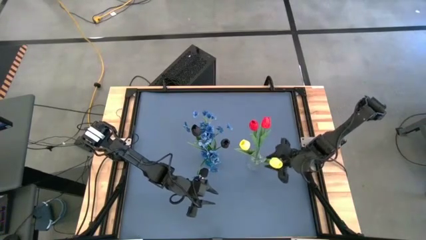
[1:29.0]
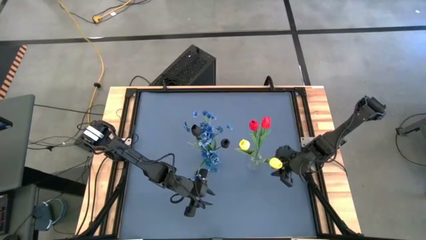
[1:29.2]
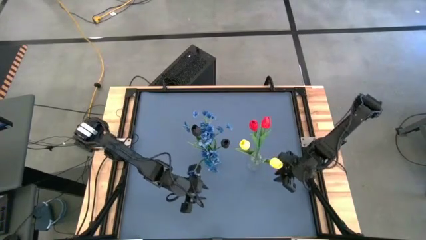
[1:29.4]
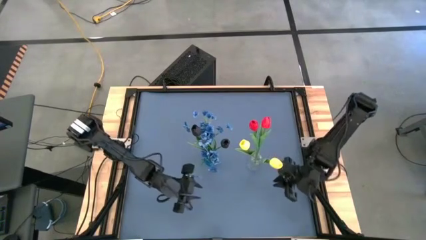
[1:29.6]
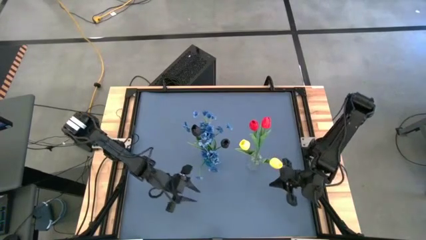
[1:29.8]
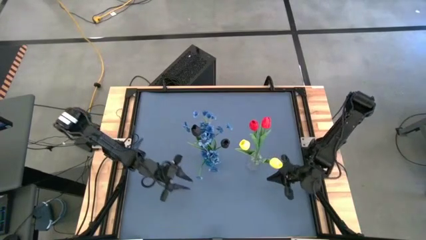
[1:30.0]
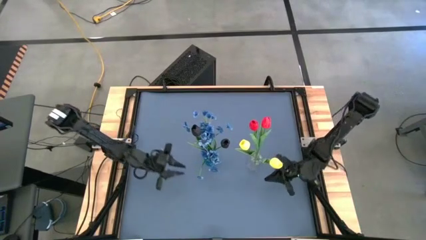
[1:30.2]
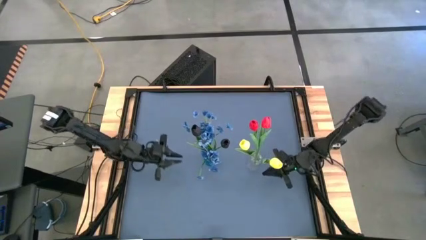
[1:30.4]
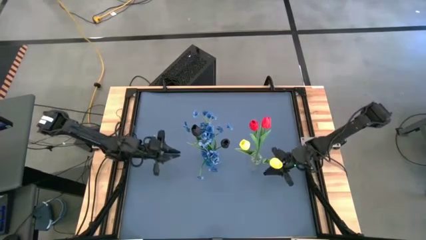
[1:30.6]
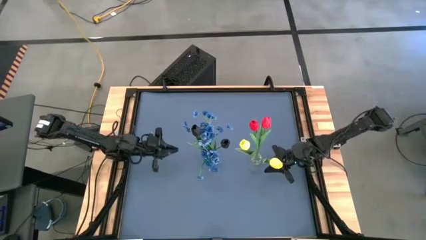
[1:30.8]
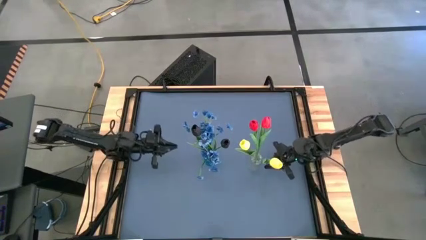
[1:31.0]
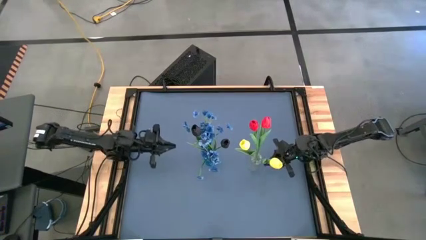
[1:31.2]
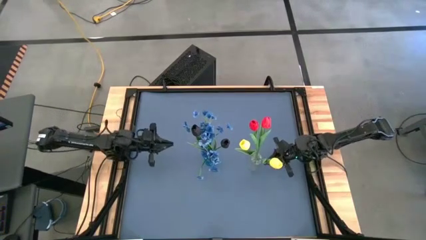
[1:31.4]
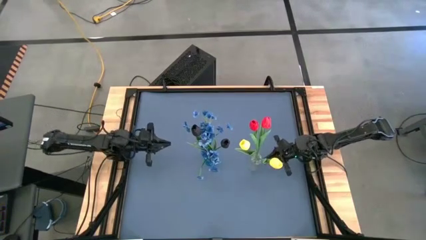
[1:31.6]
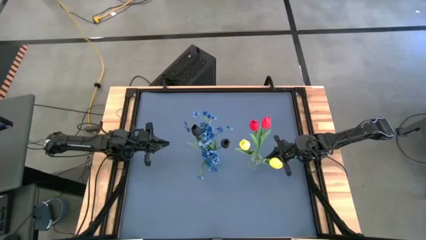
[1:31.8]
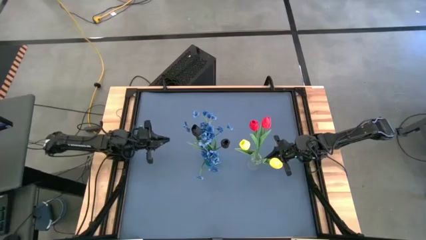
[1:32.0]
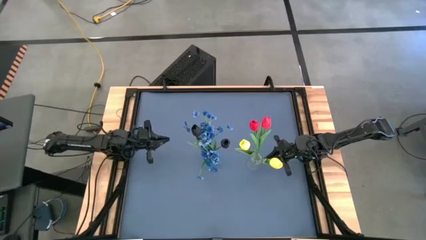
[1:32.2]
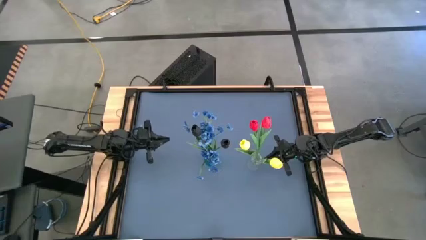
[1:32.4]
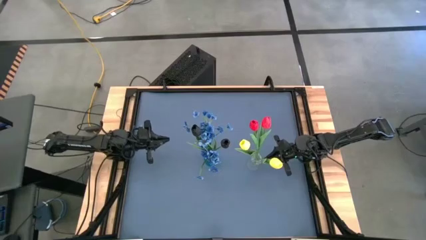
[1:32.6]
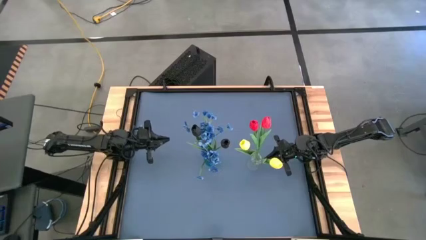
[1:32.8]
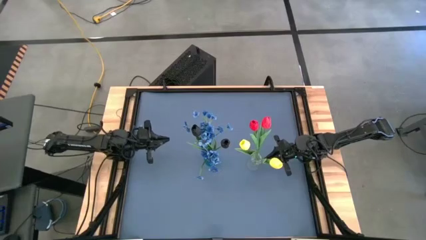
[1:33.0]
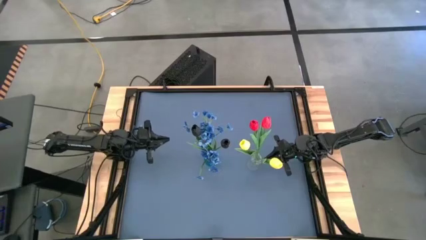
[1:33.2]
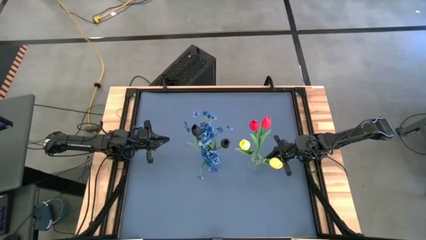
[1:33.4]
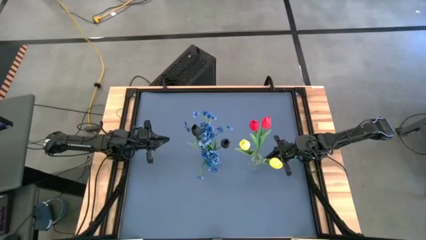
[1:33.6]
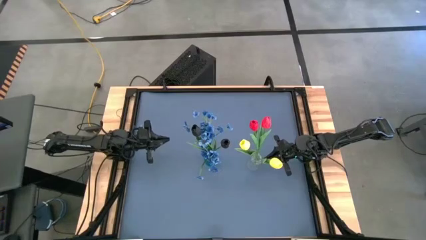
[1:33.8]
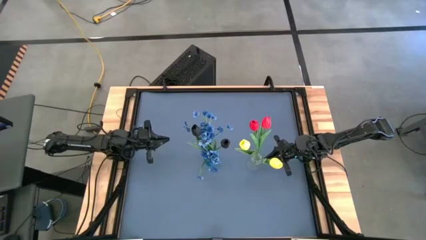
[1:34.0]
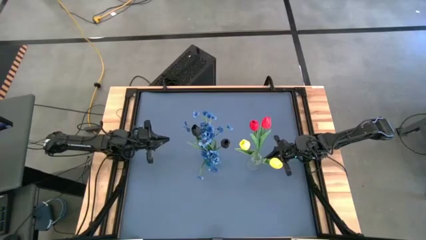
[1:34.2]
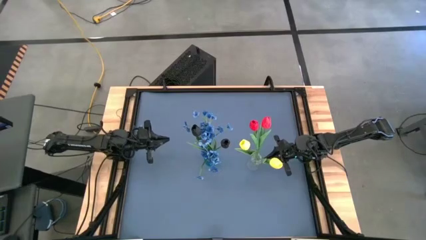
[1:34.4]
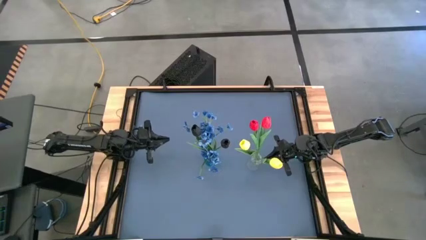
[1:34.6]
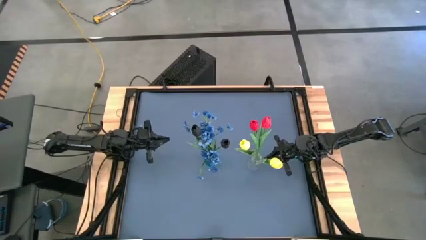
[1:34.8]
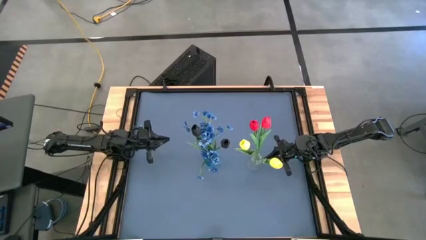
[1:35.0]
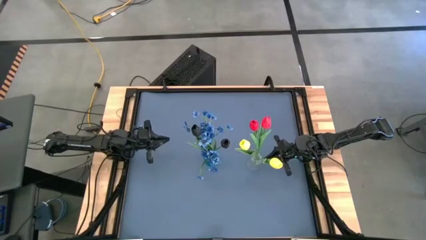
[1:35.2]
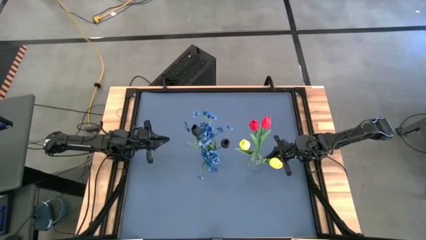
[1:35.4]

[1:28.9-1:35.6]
Task: Sort flowers into vase by color
Return to Home Position

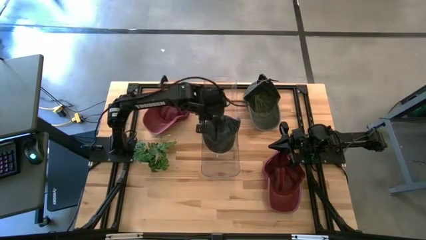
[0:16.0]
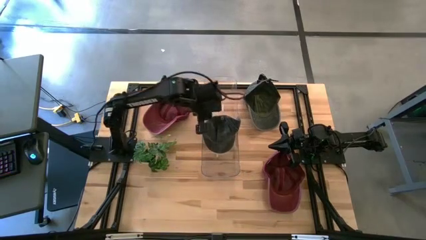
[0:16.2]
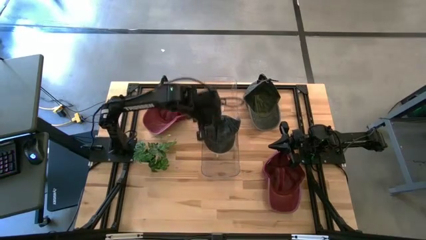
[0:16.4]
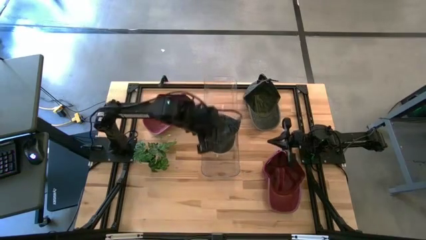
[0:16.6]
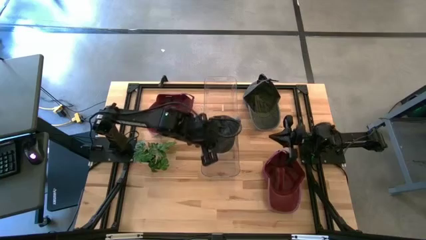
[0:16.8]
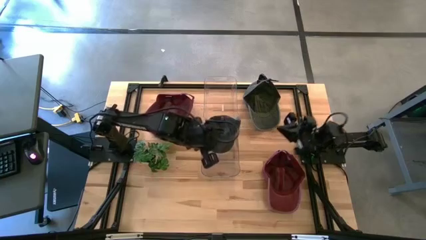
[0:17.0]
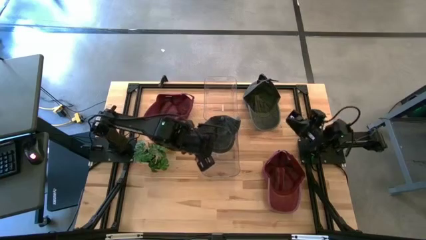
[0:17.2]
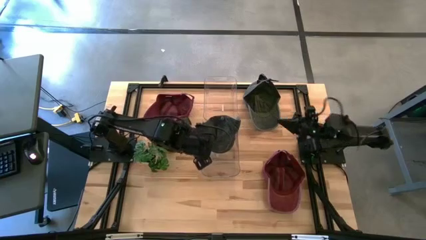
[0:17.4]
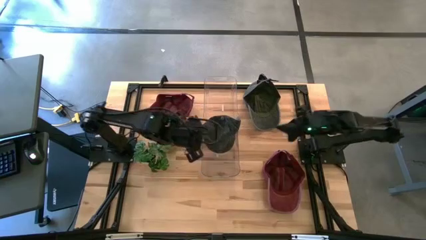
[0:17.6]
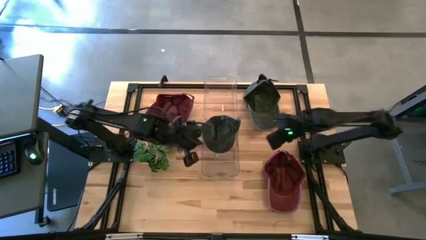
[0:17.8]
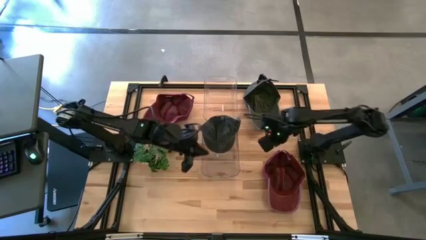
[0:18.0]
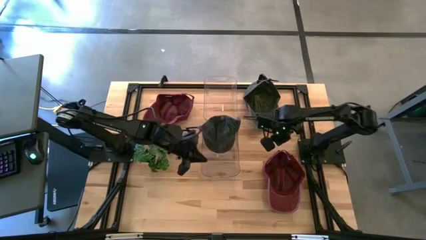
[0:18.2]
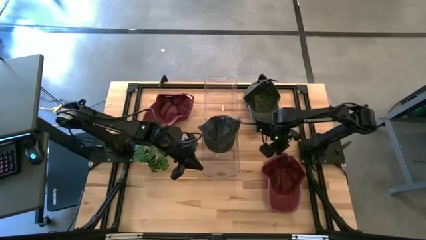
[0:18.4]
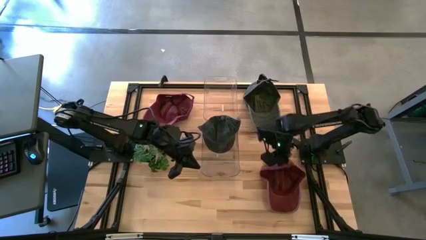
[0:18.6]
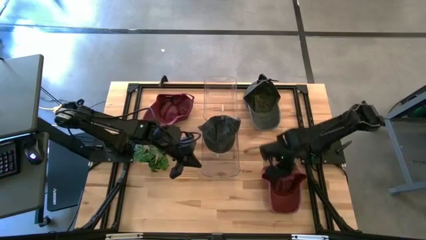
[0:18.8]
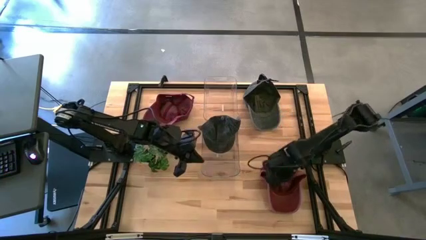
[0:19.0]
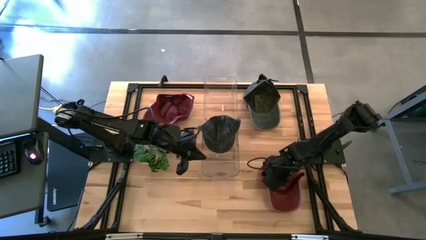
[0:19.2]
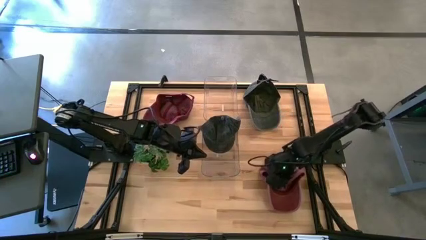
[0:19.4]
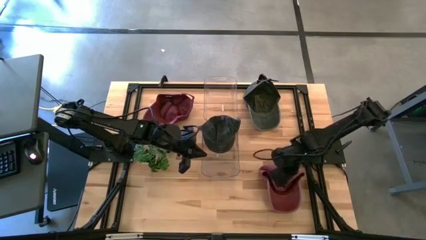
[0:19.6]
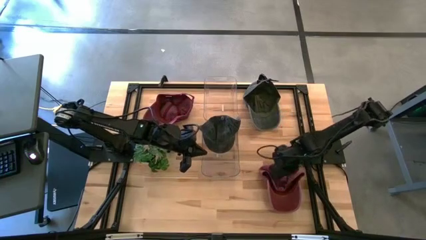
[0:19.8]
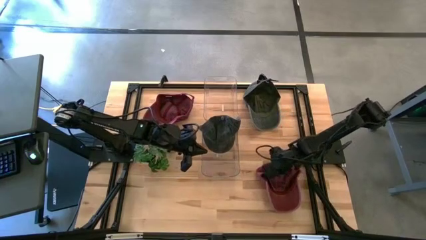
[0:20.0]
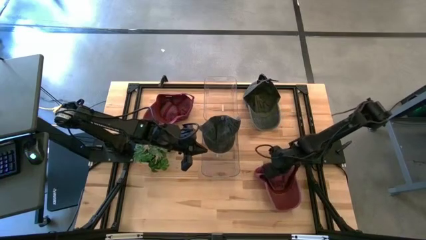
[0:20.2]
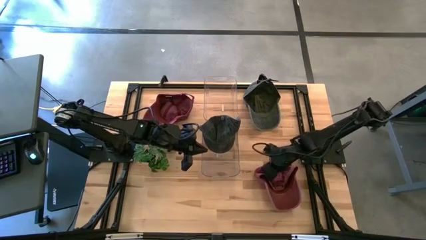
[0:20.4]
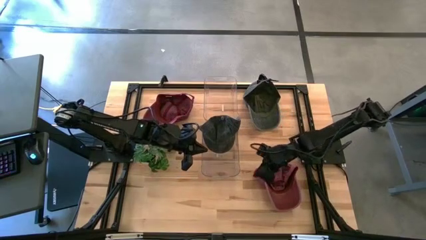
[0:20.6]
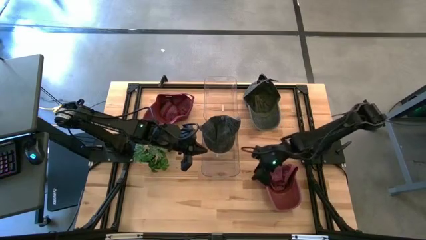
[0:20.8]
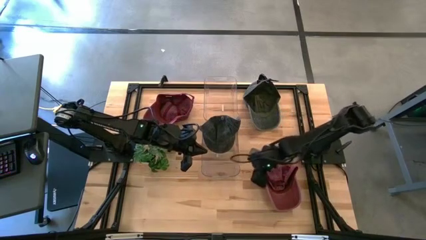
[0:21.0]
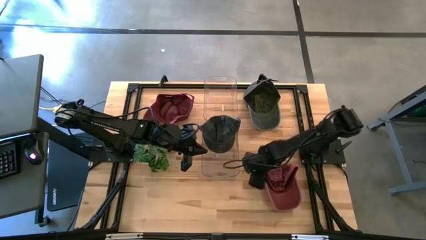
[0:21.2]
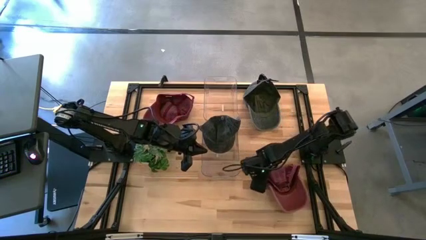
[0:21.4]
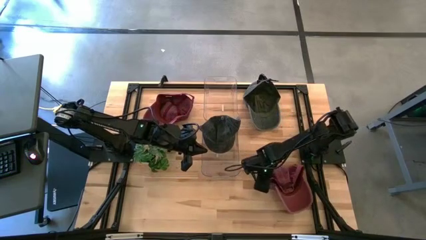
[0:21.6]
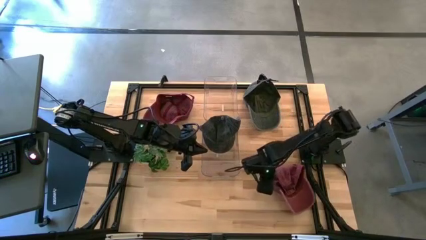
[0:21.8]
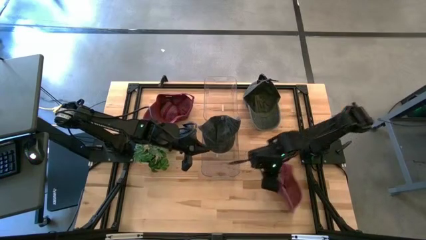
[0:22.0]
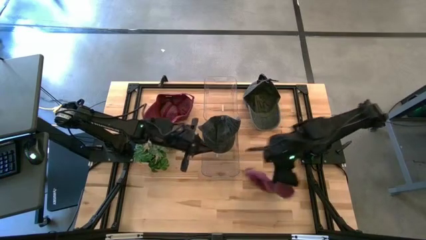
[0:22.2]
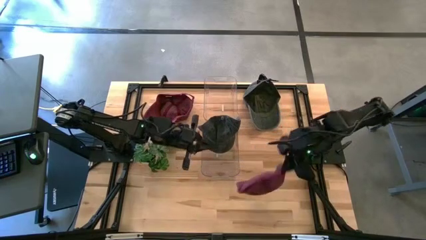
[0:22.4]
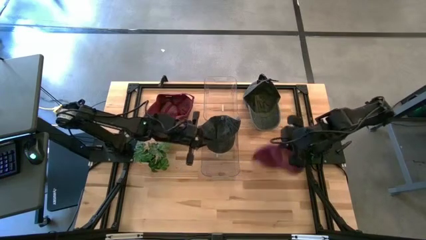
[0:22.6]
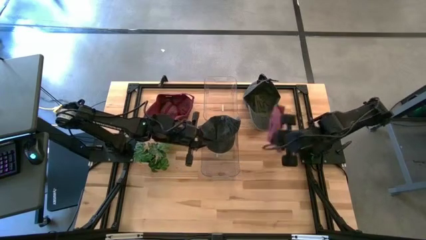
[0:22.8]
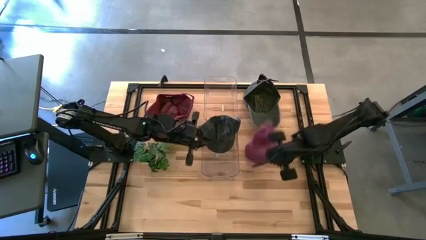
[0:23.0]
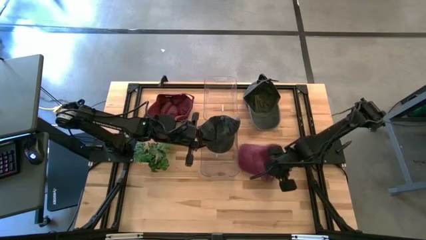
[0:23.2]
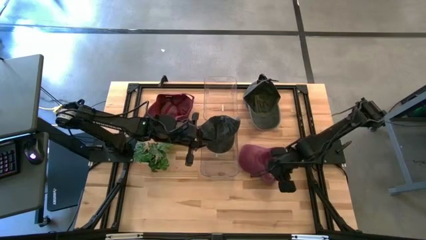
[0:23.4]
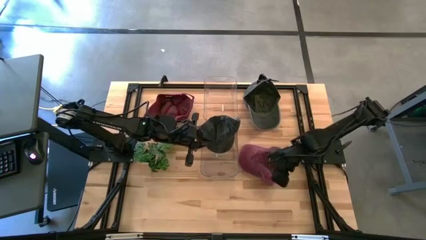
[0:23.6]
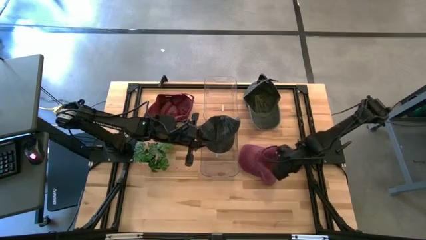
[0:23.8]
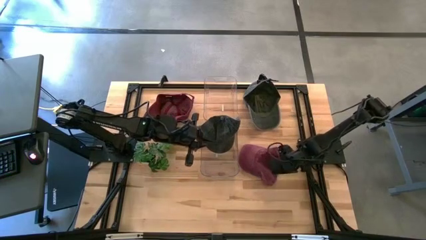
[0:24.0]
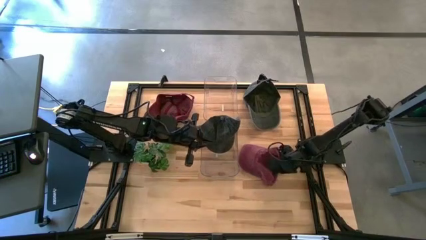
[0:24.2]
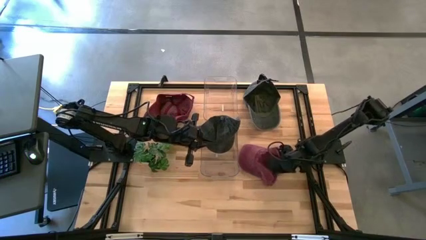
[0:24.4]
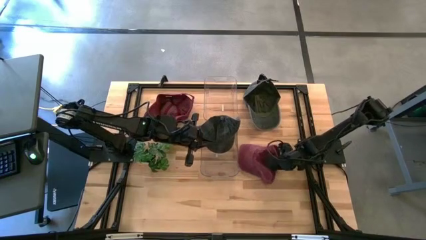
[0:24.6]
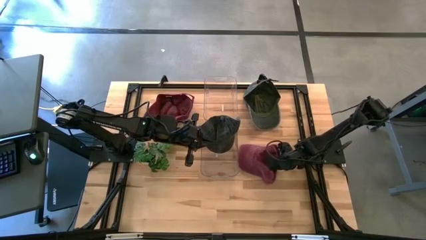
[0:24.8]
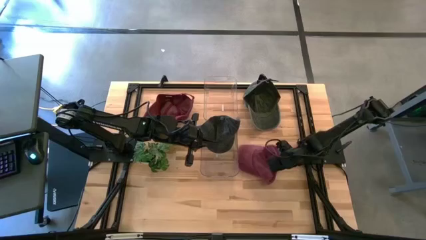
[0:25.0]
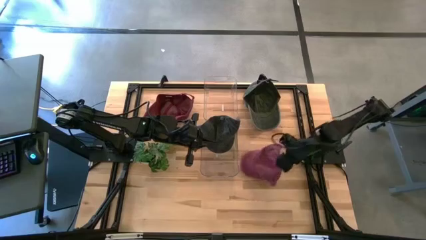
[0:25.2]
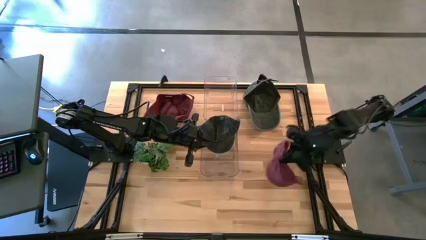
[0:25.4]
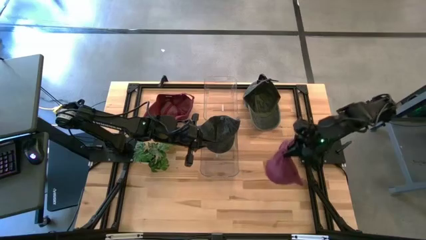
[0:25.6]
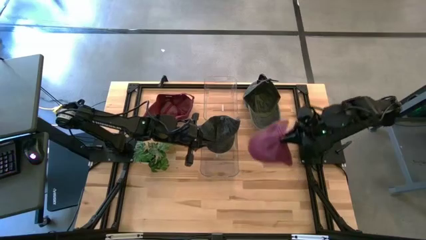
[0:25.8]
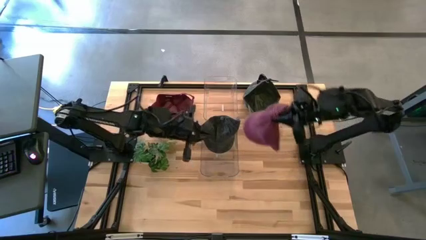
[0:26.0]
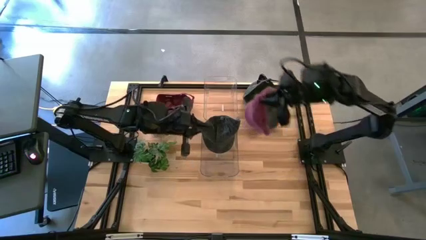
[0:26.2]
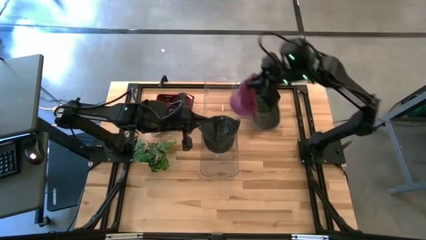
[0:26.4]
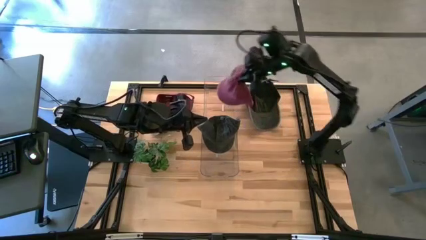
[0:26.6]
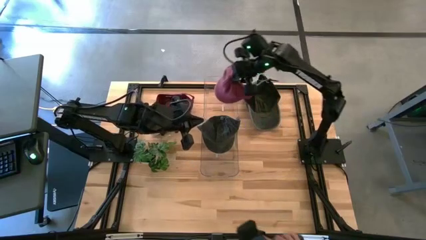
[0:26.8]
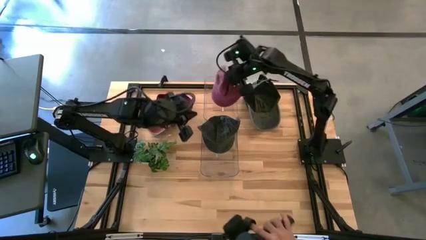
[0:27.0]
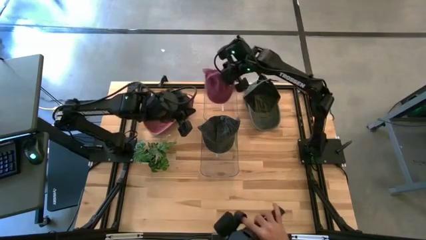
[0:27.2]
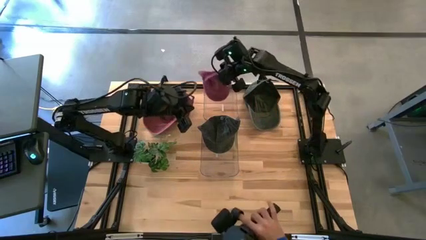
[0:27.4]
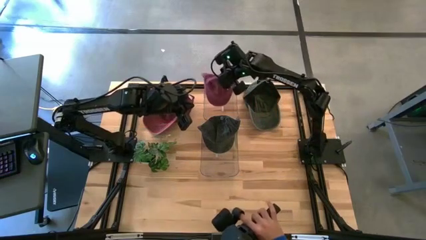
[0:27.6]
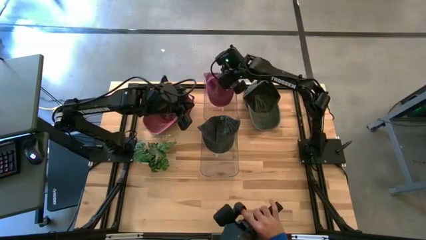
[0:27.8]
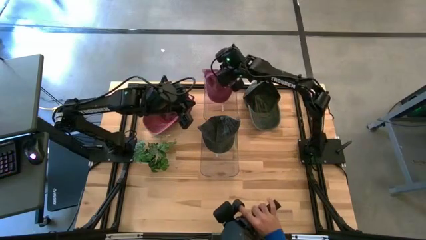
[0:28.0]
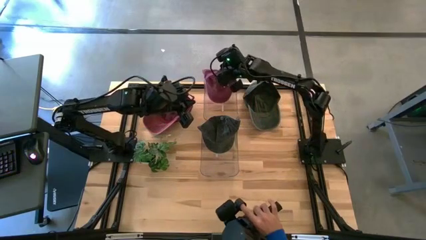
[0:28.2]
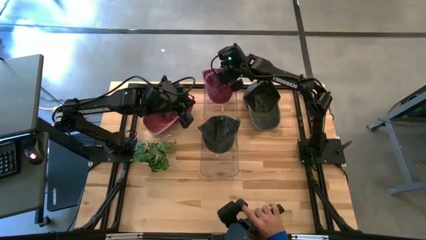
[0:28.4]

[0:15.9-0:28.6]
Task: Pick & Place hat
Put the bottom red cap into the top transparent bin
